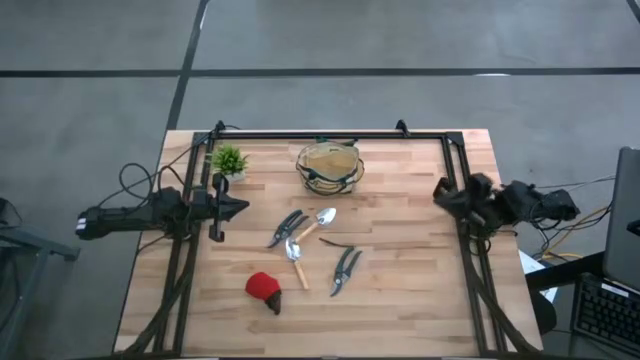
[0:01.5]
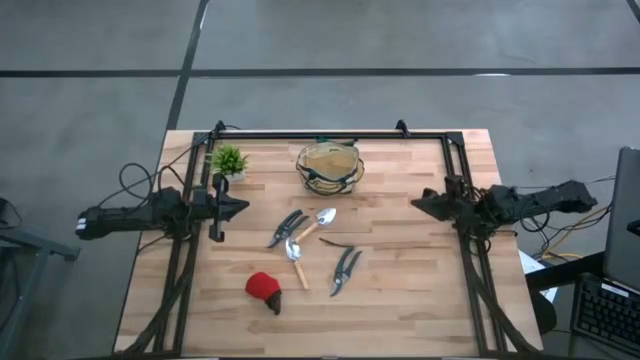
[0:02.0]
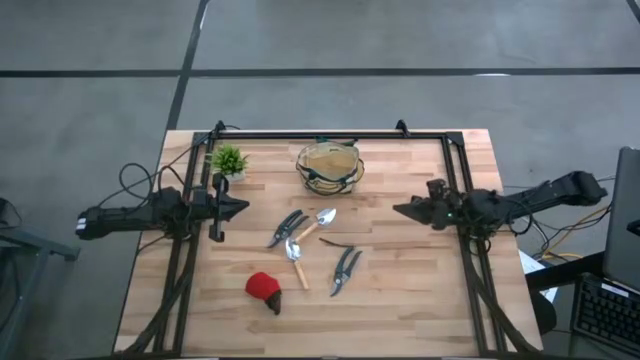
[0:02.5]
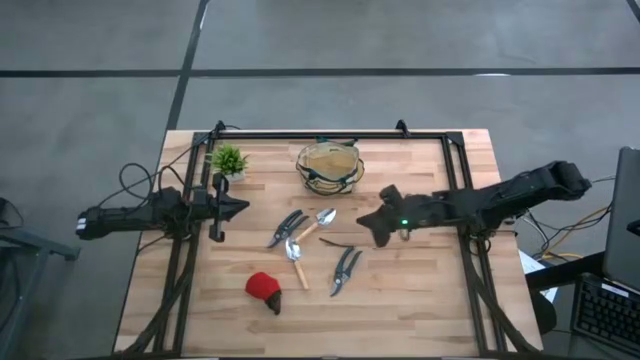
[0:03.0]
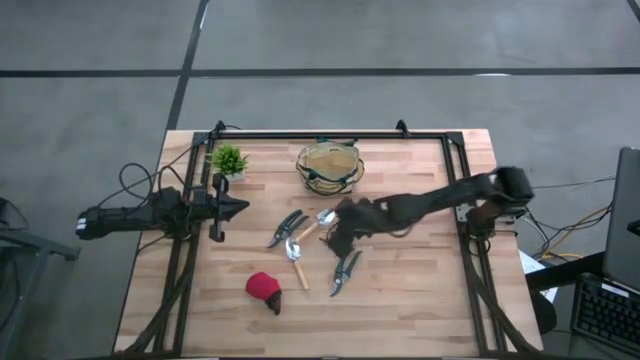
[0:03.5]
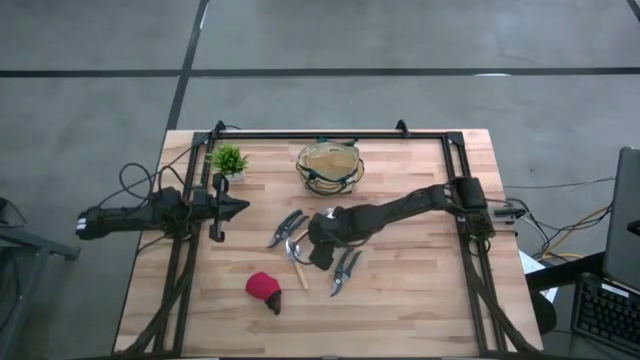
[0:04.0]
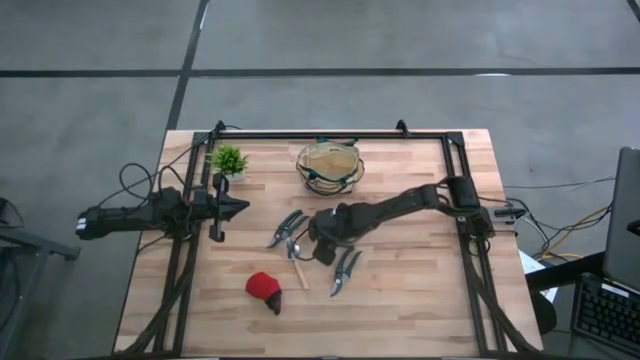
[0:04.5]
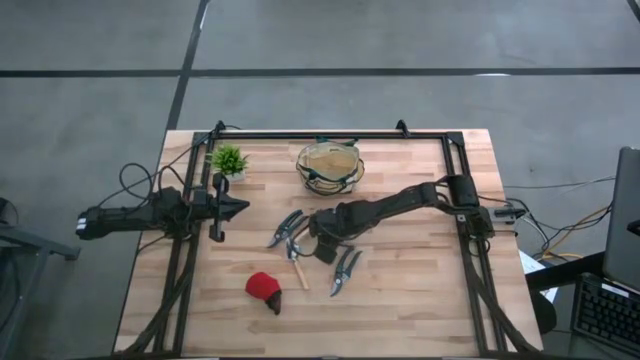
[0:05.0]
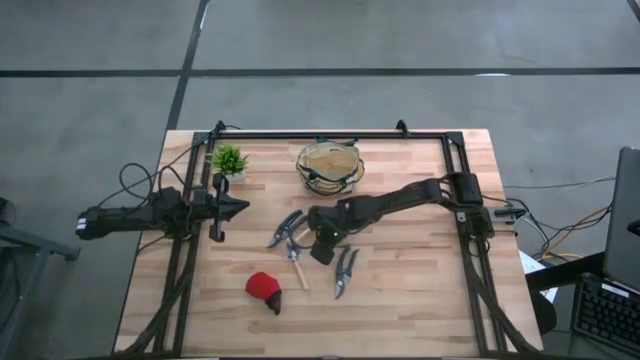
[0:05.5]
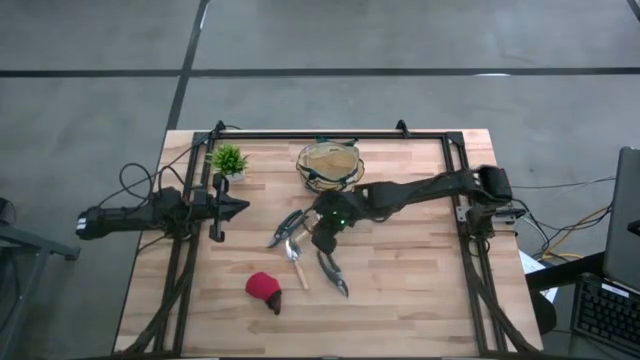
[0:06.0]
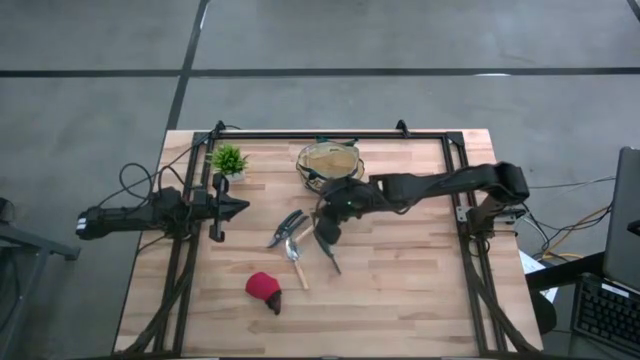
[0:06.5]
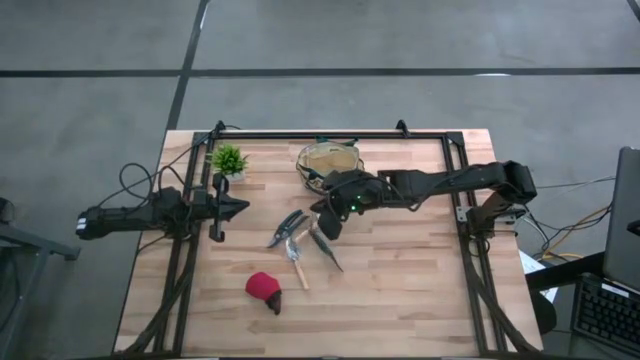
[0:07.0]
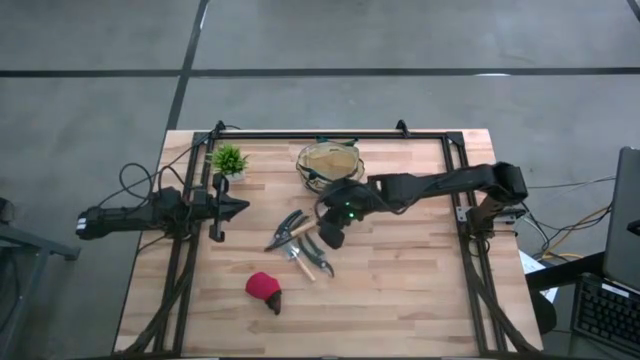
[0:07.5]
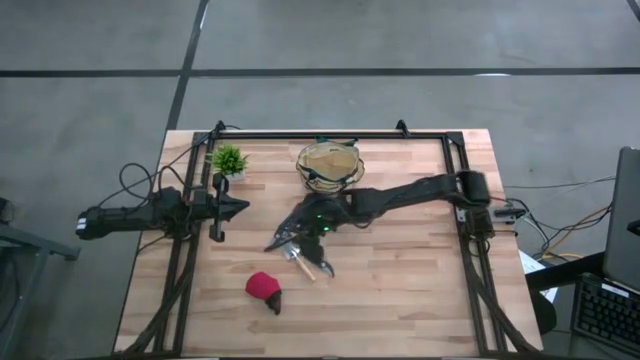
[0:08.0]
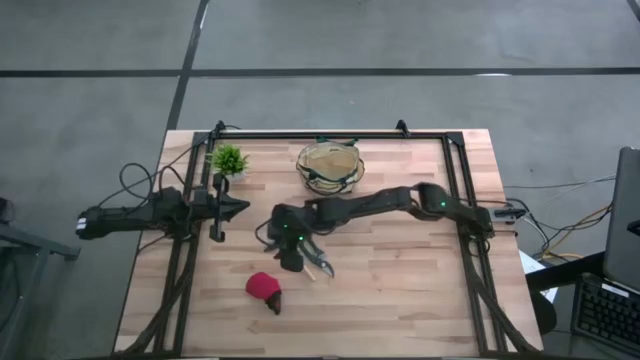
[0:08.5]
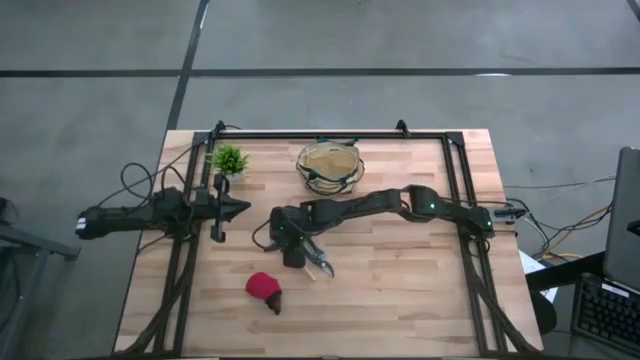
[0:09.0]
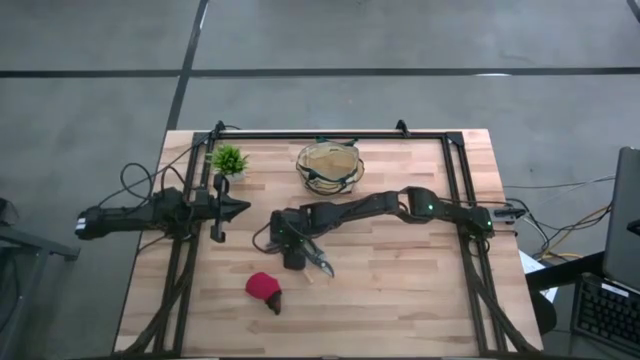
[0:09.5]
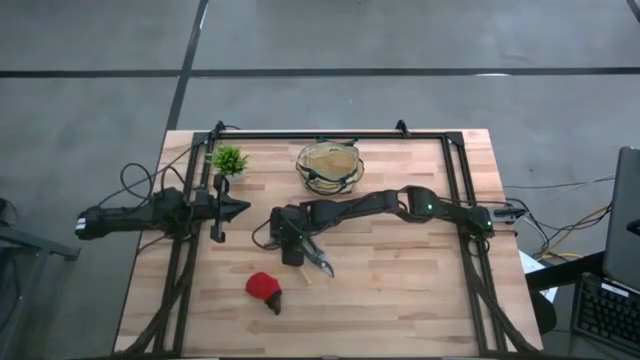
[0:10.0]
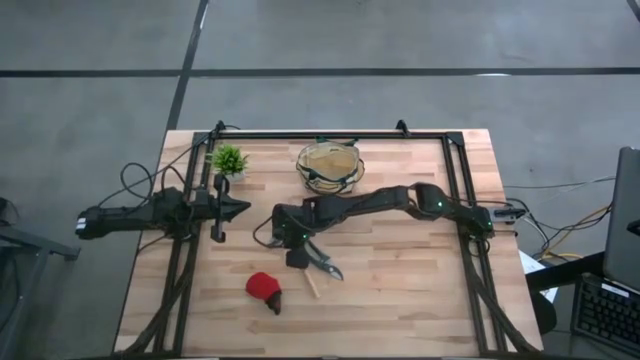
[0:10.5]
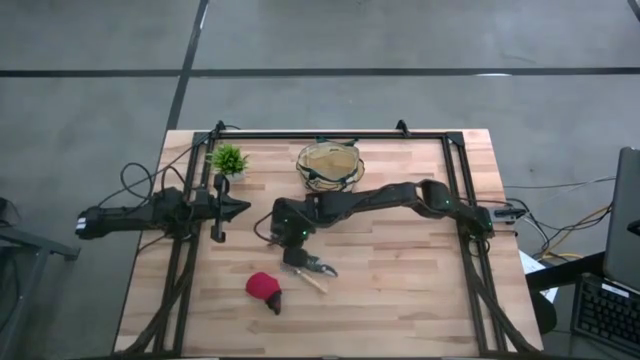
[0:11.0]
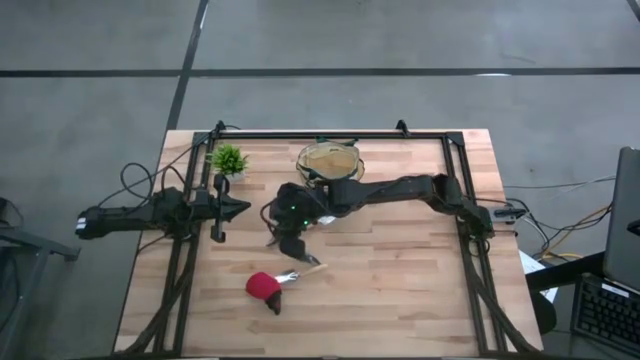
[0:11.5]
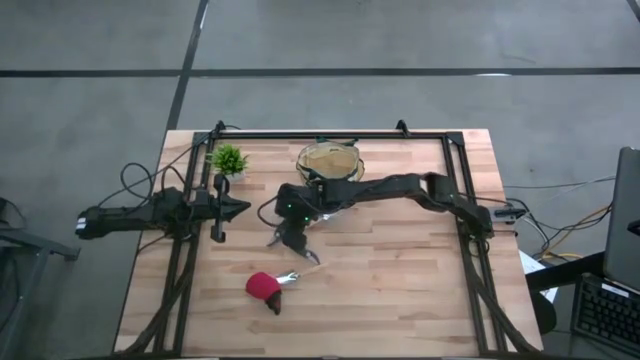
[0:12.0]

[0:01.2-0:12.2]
Task: Pick & Place Garden tools in Gardening bag
Put the bottom green shear scissors into the brown gardening bag

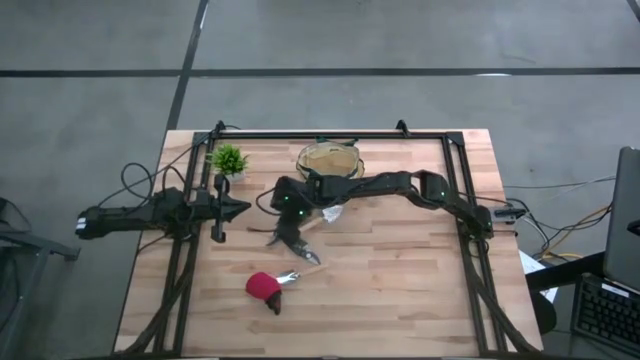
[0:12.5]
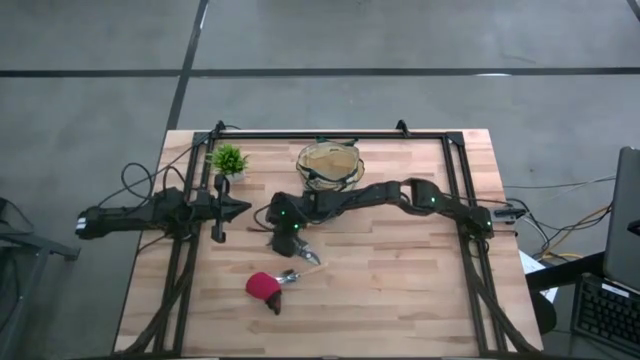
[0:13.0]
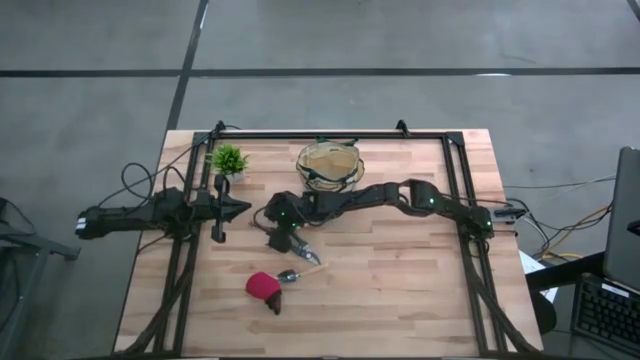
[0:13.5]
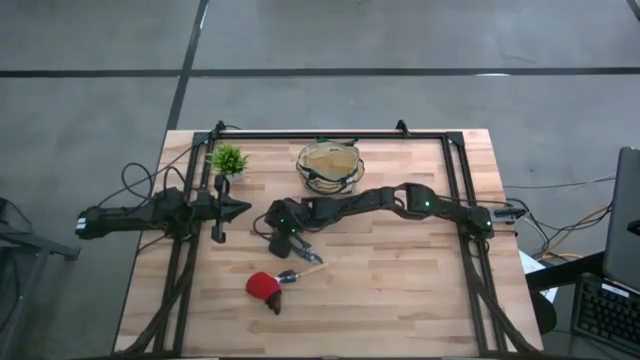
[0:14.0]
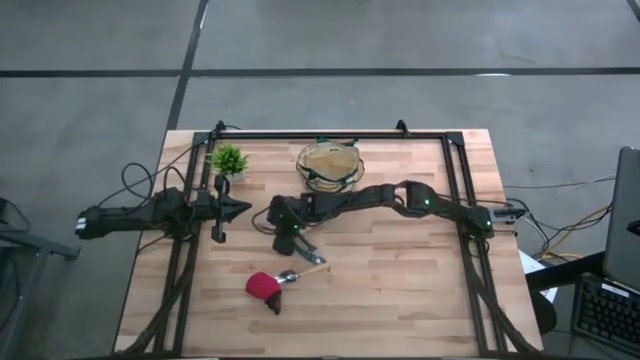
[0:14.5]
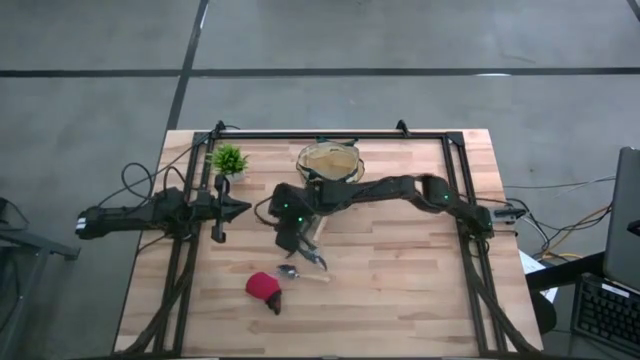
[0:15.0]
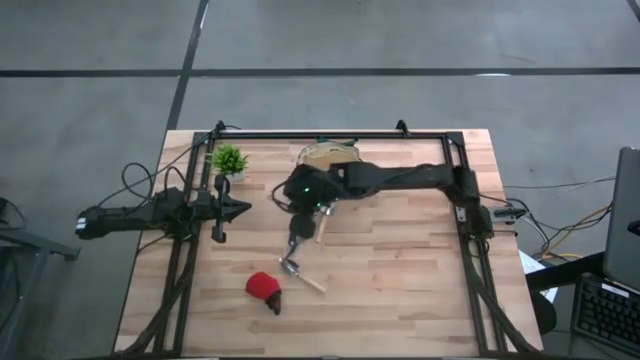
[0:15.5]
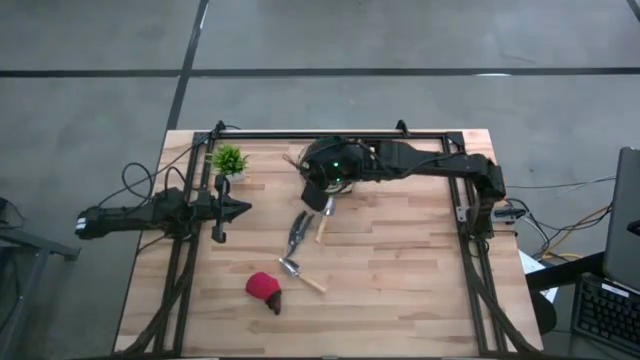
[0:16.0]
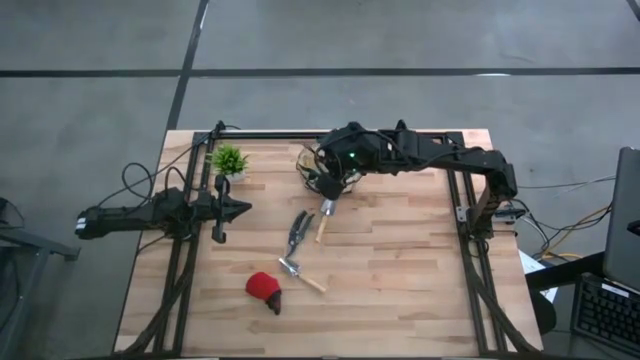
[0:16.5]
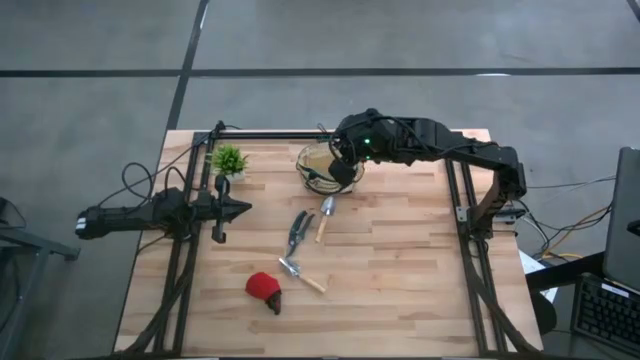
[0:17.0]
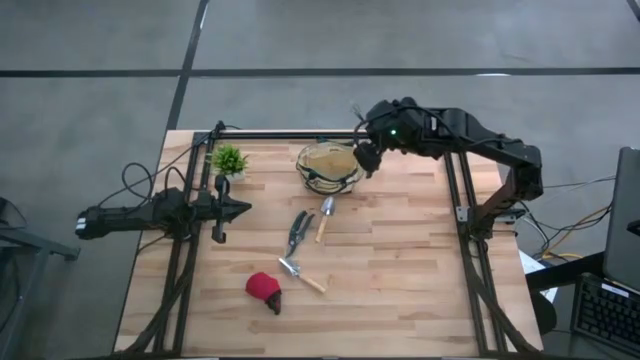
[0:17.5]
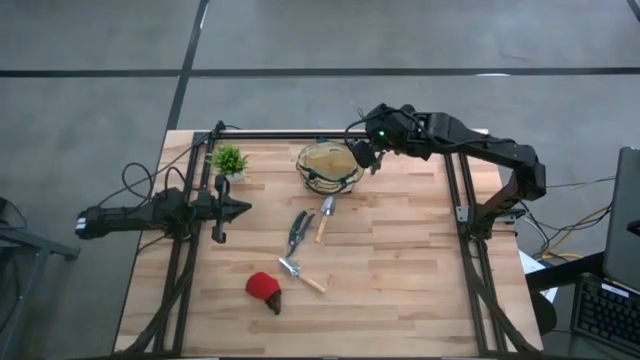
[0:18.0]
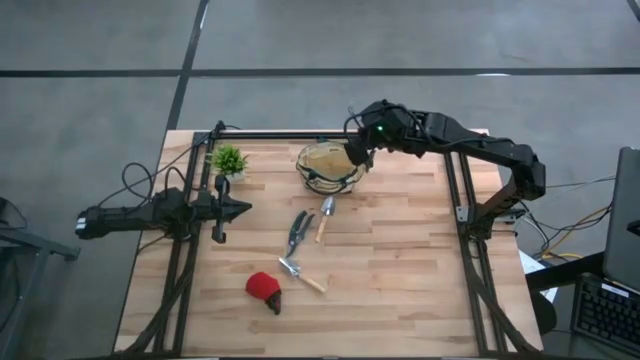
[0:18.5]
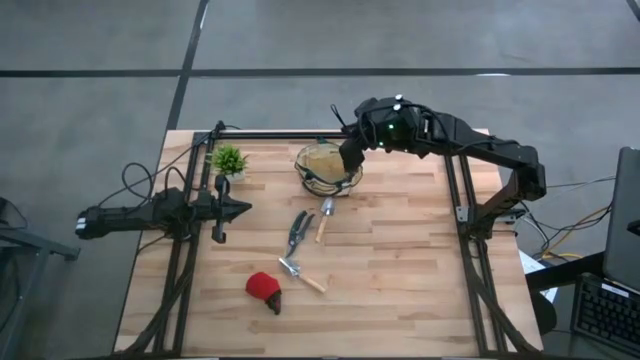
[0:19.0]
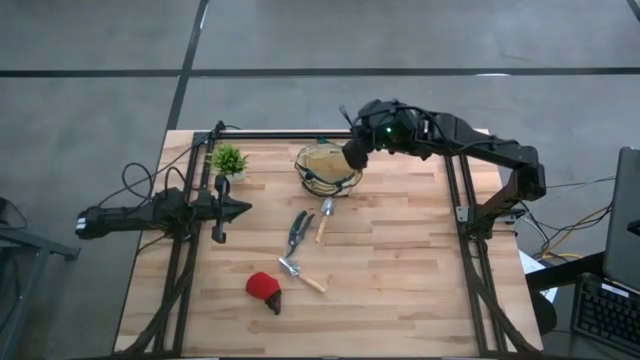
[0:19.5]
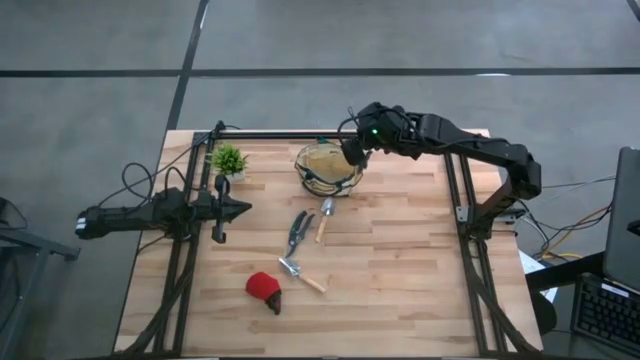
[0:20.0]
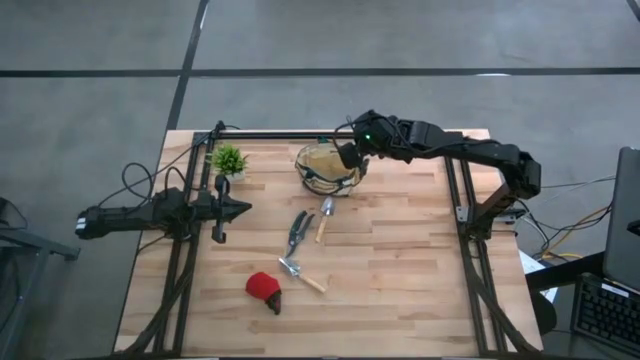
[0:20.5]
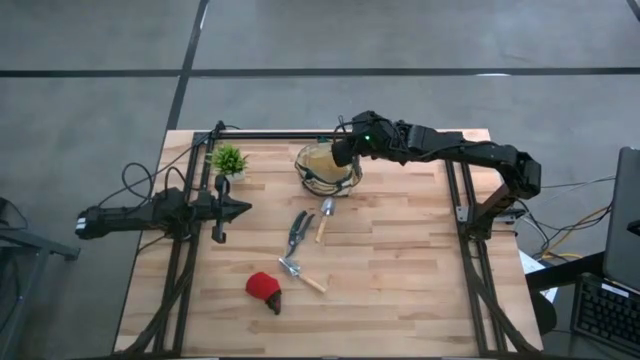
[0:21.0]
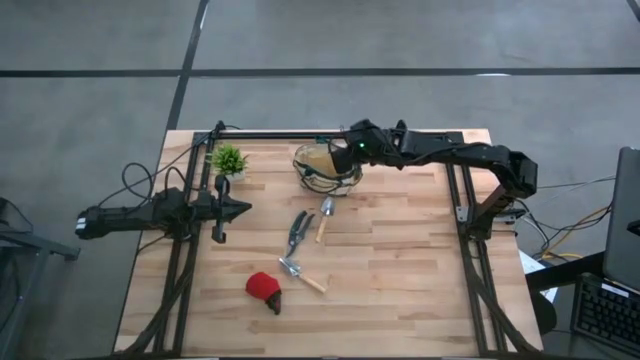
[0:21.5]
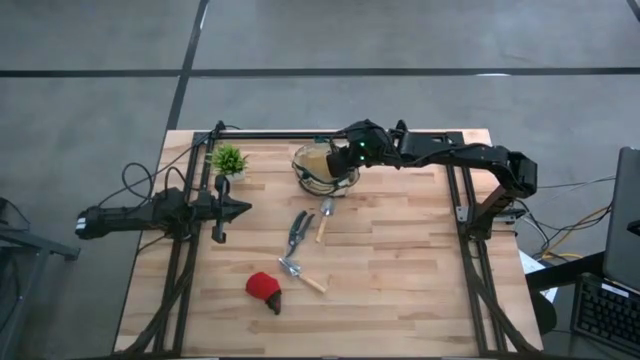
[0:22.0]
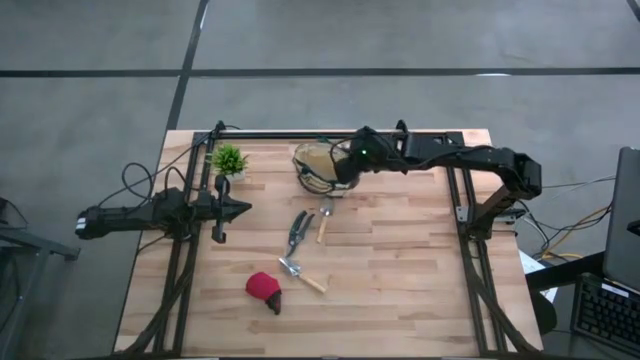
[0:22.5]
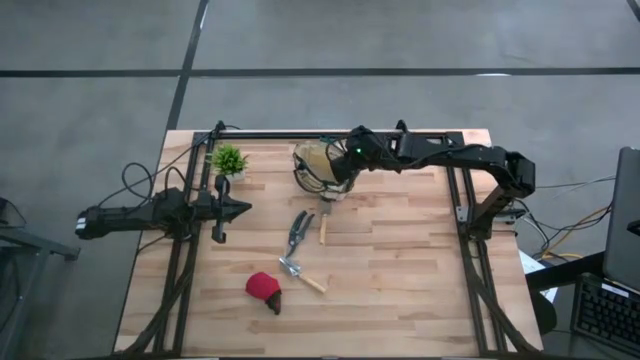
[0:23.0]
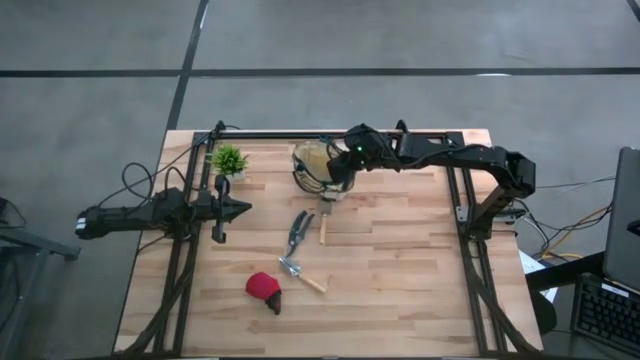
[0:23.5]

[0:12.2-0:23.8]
Put the bottom green shear scissors into the brown gardening bag
